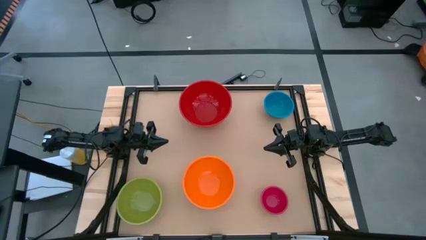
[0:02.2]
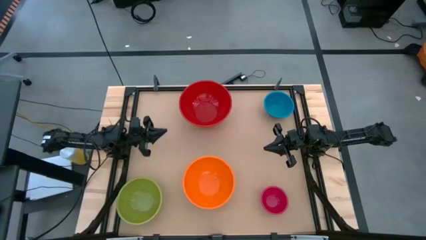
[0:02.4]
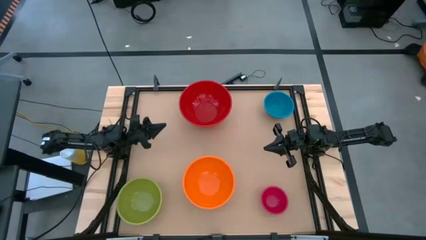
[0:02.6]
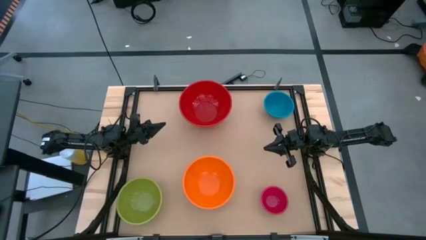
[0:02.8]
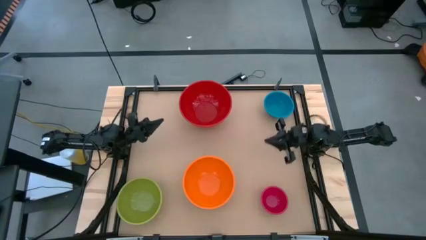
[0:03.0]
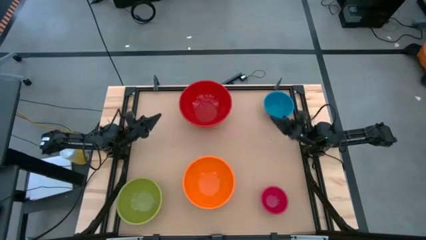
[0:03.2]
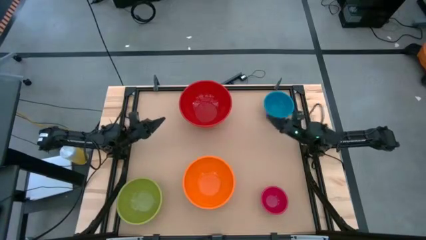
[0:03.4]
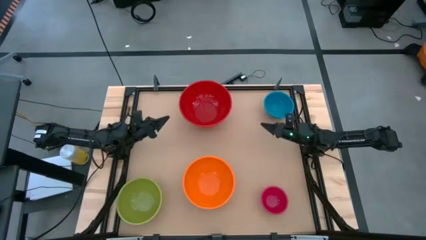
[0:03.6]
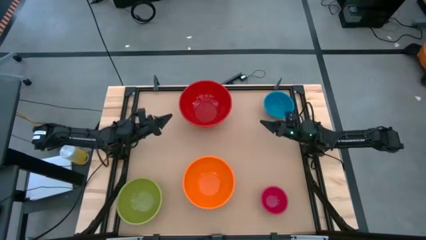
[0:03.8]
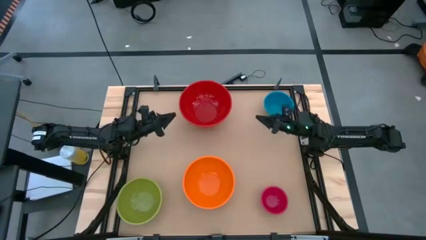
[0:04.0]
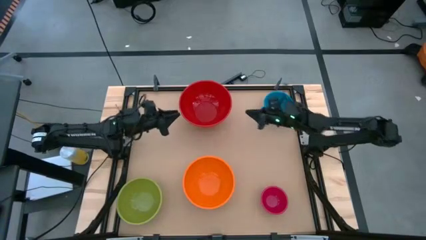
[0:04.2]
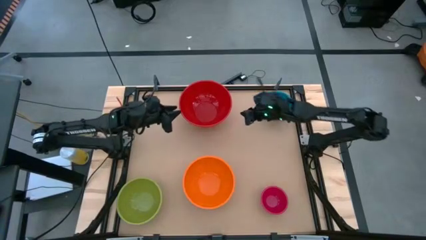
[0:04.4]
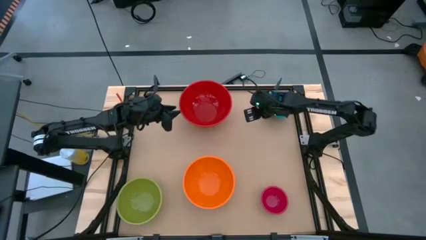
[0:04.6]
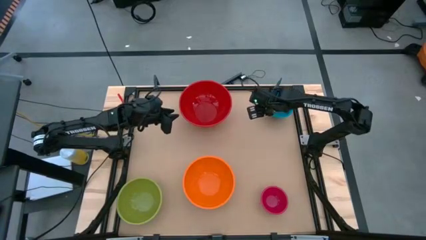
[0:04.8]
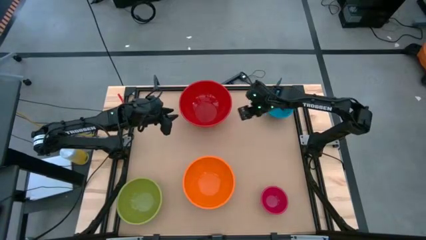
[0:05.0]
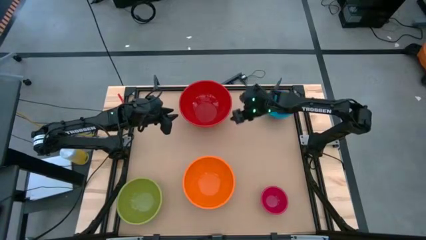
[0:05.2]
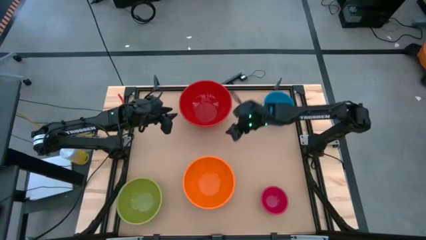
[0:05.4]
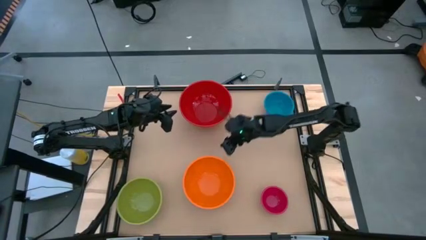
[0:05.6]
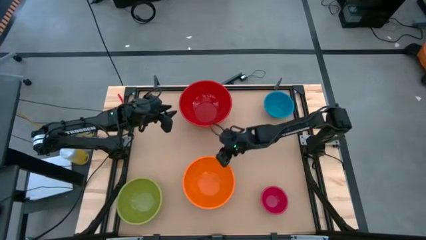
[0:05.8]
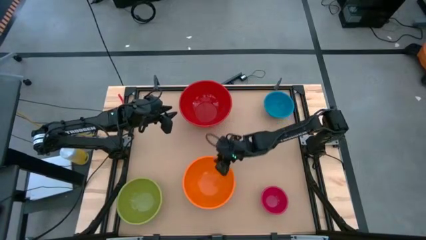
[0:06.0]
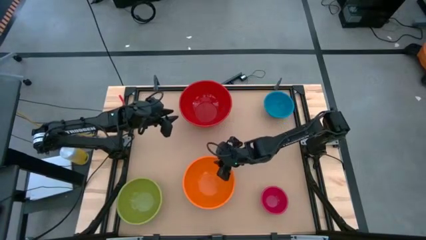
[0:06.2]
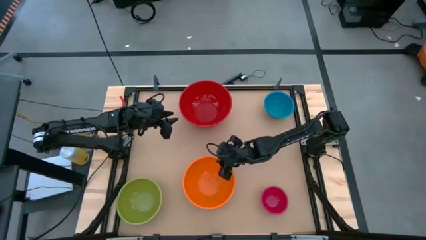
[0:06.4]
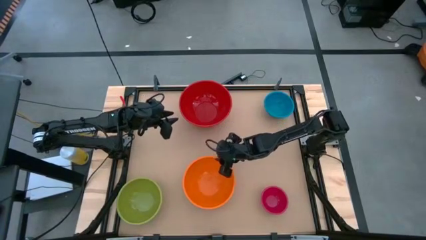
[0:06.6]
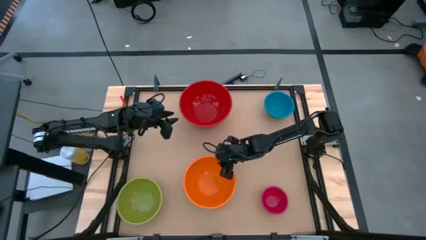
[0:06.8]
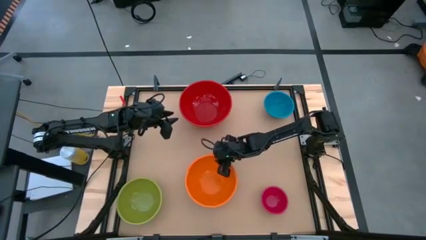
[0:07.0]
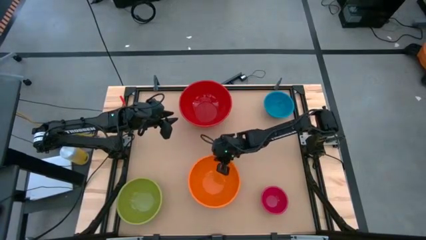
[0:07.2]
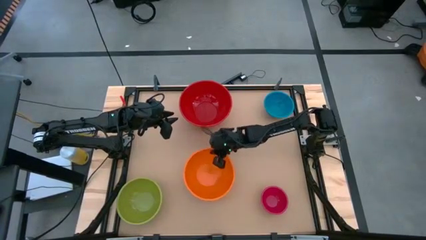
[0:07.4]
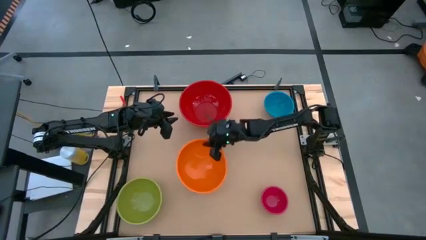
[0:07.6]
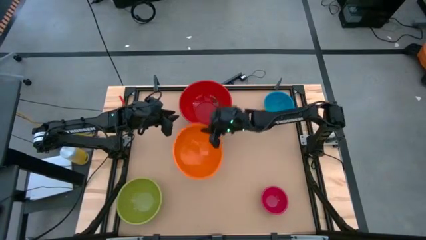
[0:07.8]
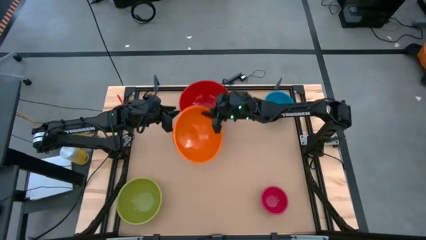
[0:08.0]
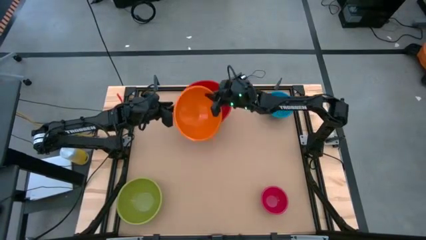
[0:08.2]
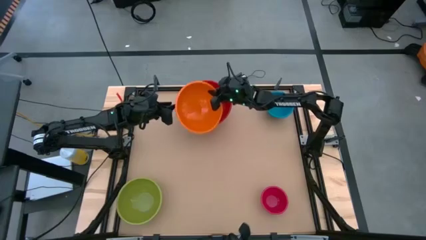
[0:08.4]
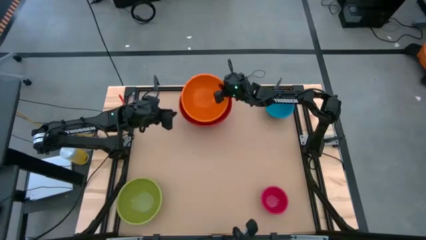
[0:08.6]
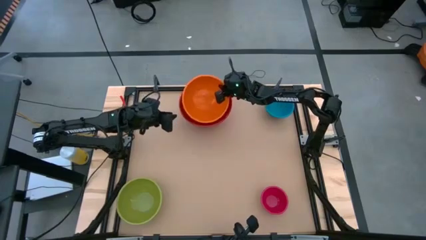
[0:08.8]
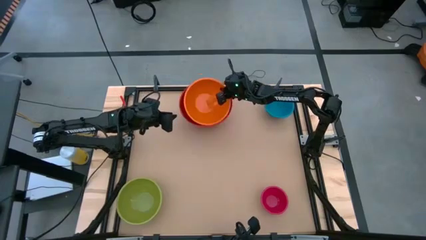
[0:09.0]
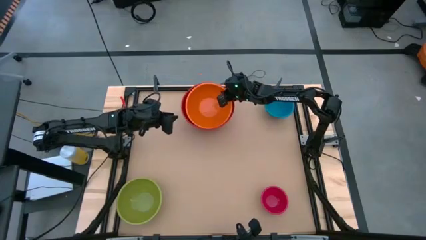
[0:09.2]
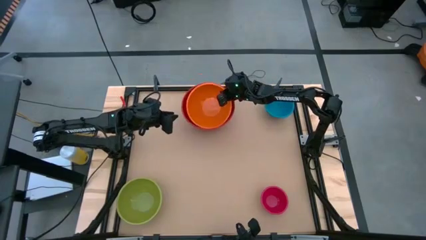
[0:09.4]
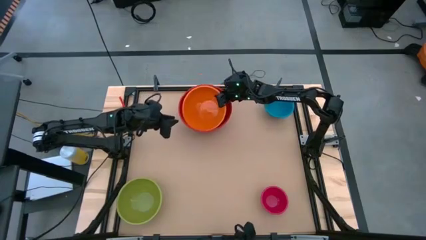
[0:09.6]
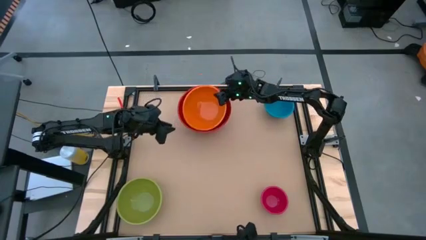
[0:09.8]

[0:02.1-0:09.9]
Stack the orange bowl on top of the red bowl

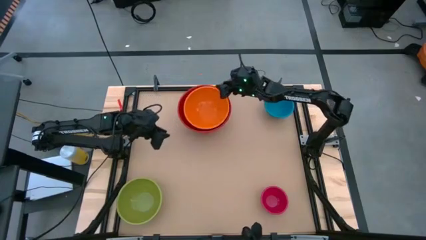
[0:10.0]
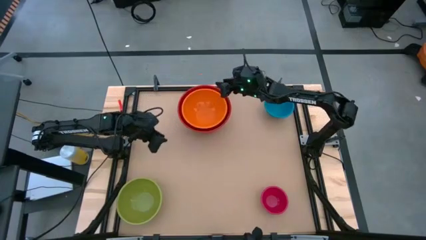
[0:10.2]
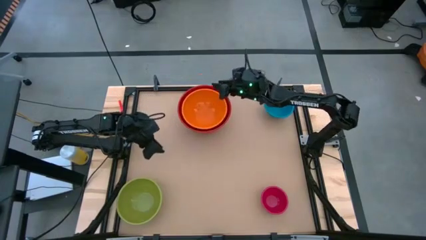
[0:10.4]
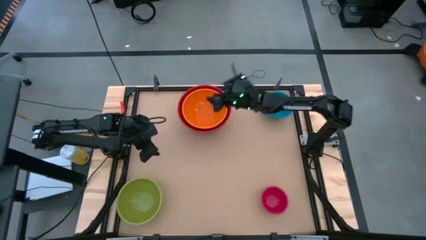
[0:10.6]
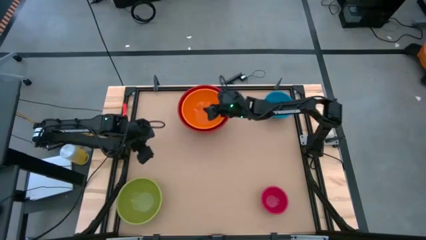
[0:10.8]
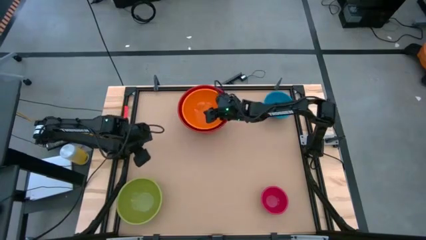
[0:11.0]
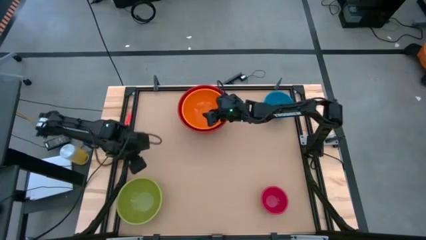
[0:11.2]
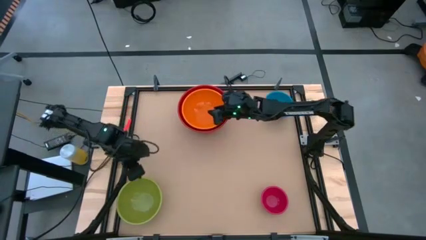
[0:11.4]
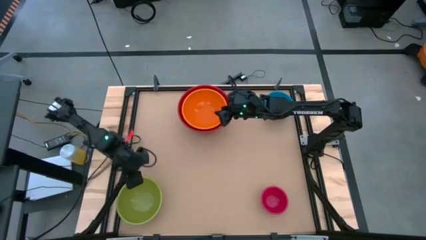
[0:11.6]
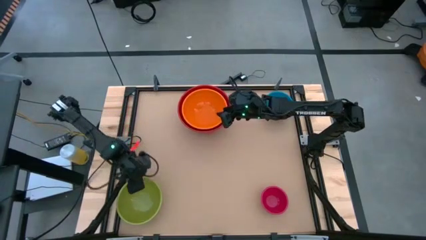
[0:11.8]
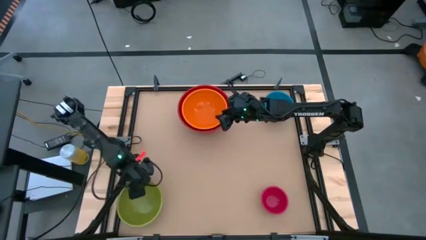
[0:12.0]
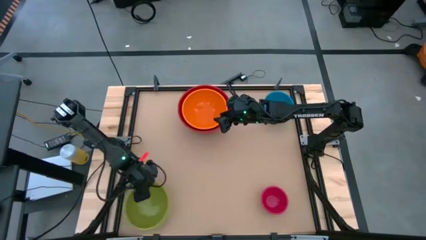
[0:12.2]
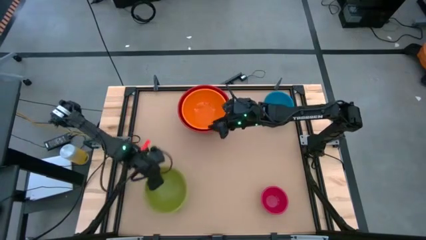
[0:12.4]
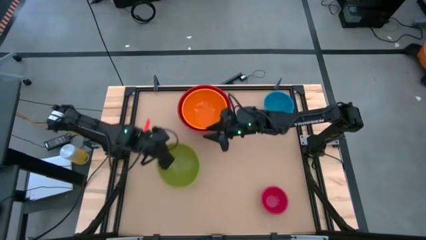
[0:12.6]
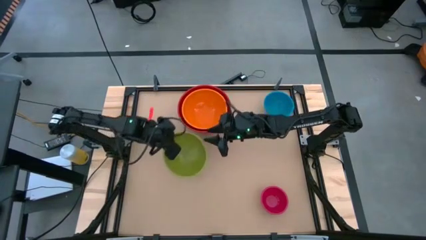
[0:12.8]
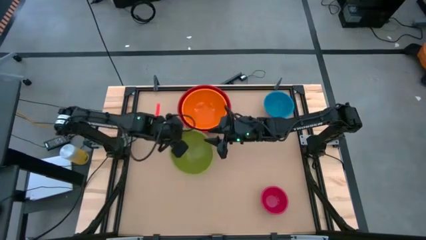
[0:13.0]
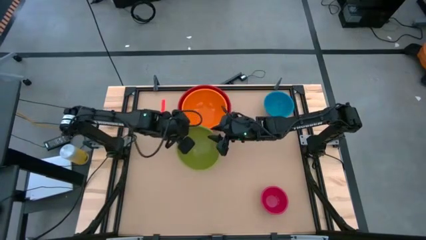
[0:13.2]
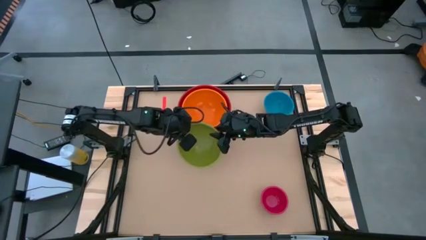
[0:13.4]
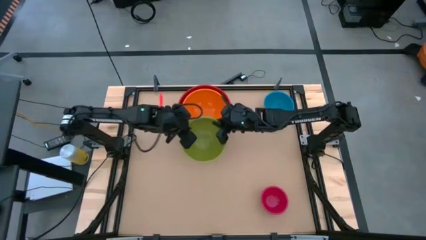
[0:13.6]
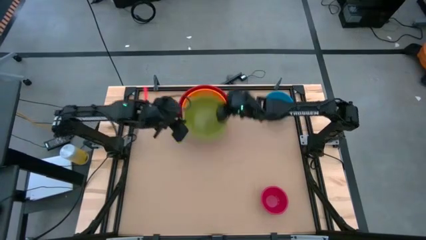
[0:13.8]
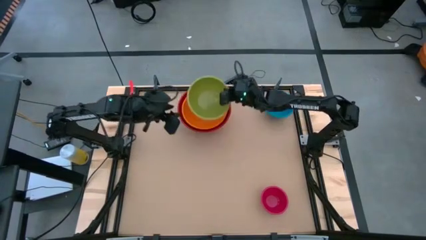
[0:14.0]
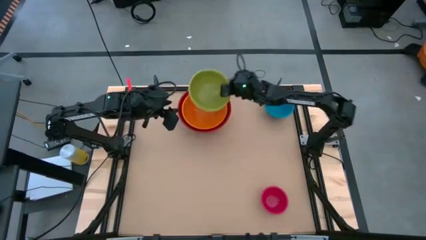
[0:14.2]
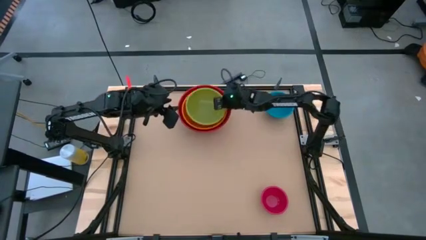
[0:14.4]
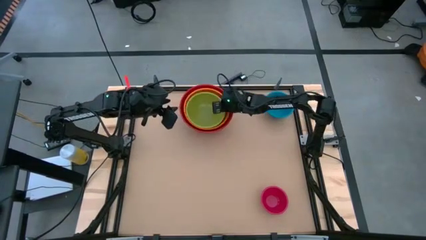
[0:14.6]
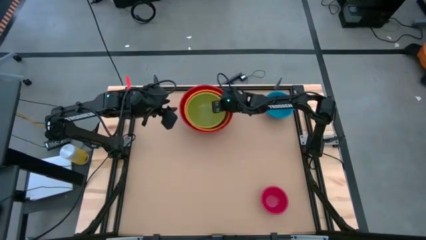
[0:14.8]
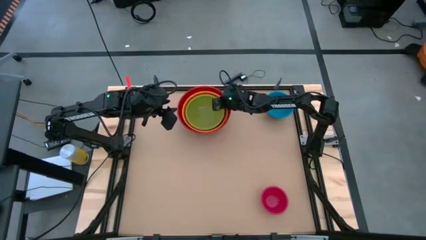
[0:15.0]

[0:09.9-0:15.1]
Stack the green bowl on top of the orange bowl

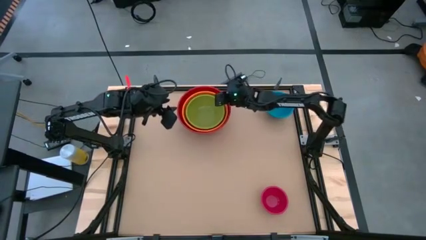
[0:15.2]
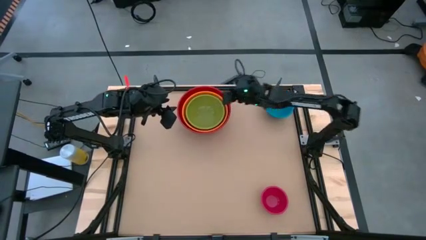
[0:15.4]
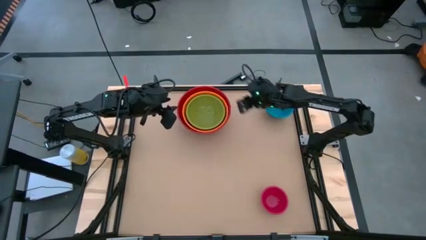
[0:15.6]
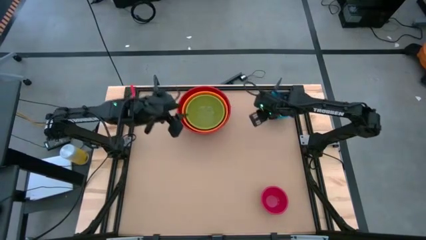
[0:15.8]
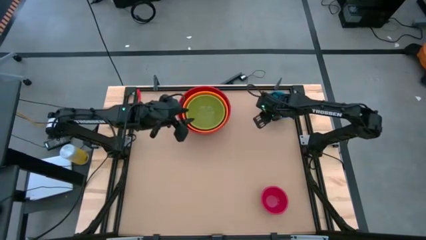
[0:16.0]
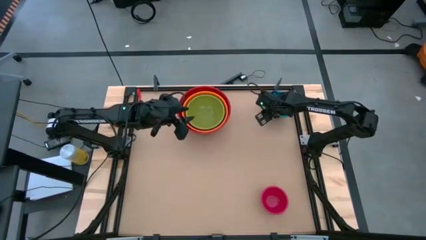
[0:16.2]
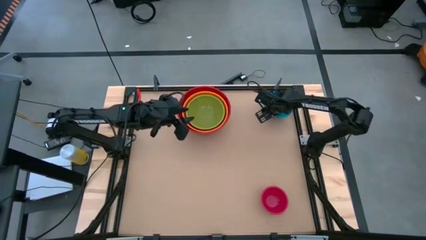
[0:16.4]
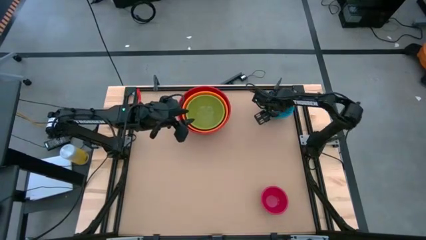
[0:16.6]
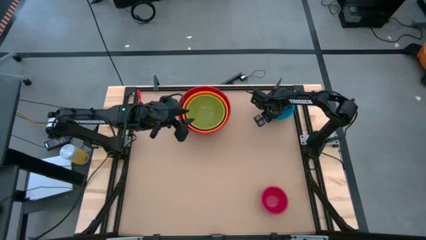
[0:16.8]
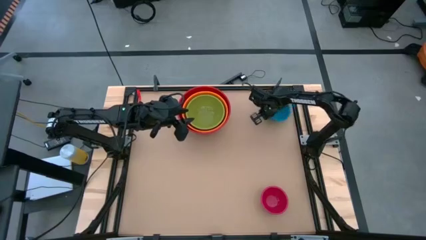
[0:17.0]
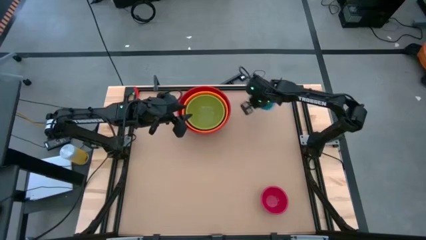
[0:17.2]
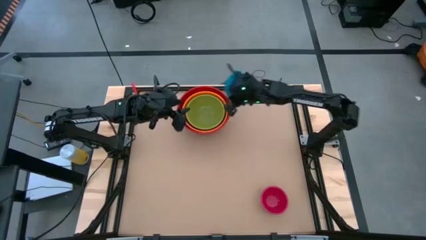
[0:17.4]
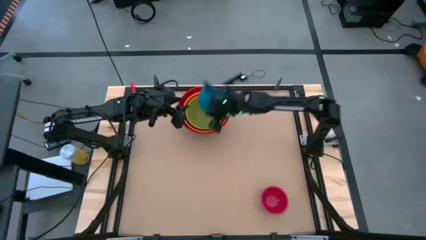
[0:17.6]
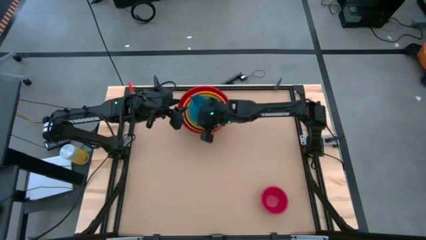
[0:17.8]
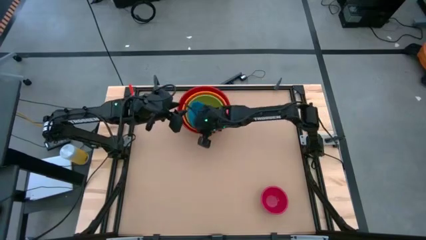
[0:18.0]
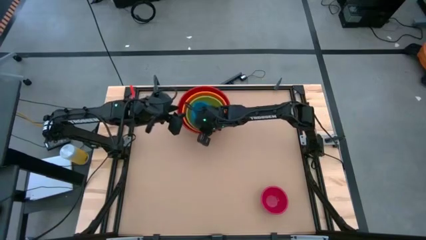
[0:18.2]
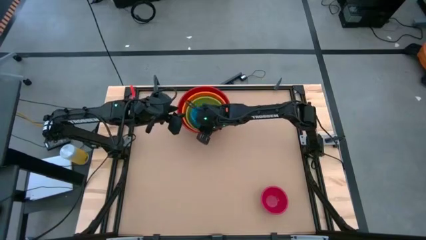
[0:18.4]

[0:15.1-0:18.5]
Stack the blue bowl on top of the green bowl
